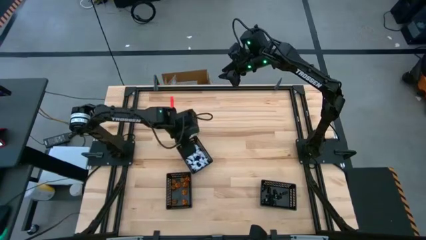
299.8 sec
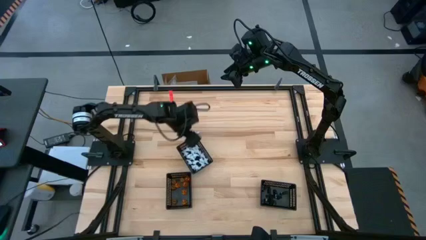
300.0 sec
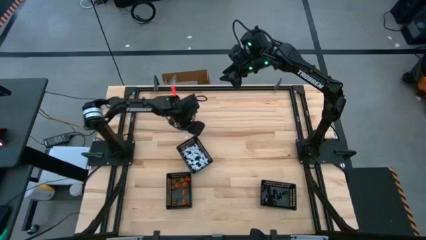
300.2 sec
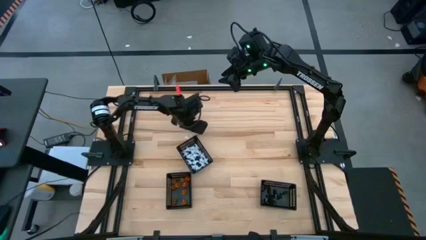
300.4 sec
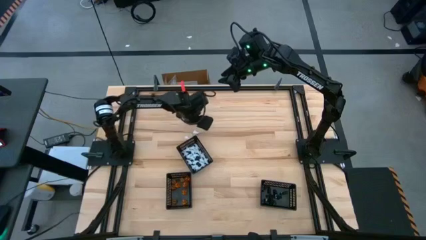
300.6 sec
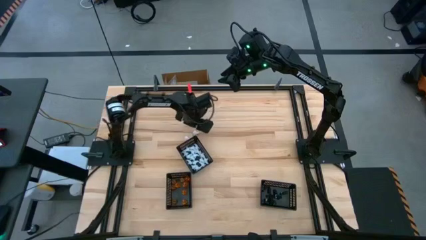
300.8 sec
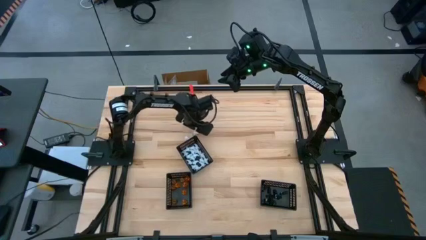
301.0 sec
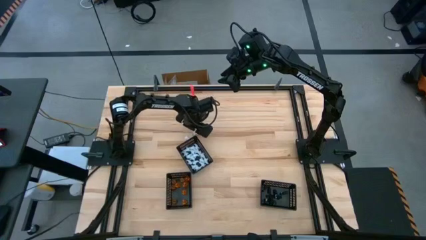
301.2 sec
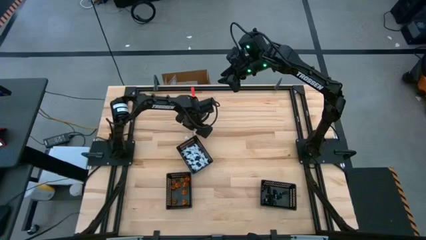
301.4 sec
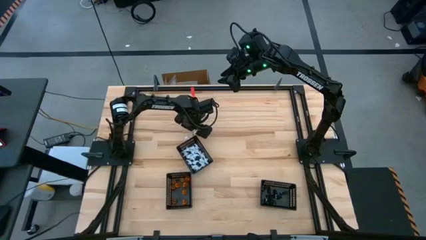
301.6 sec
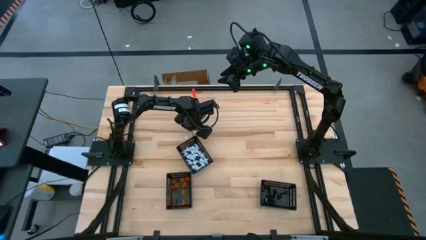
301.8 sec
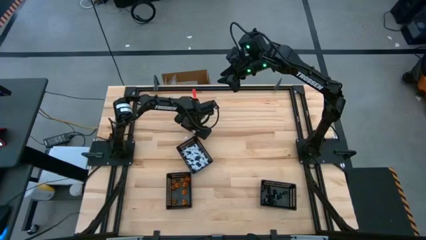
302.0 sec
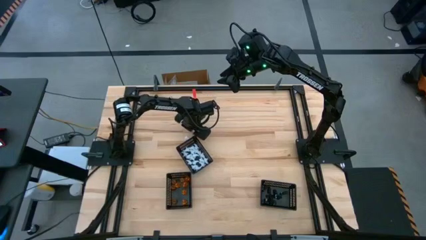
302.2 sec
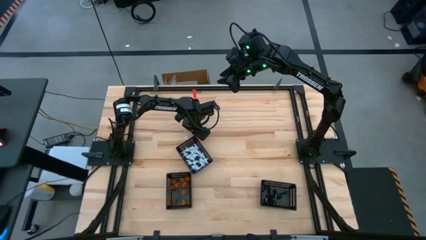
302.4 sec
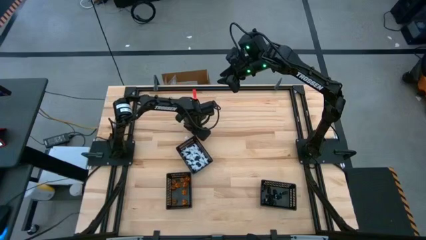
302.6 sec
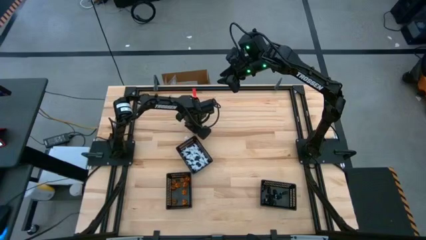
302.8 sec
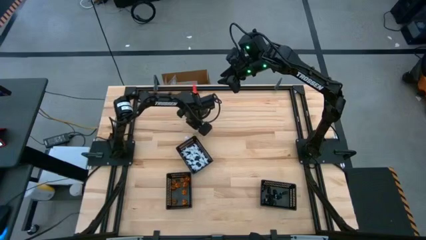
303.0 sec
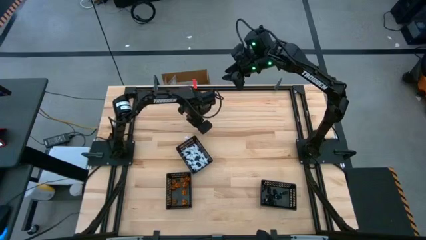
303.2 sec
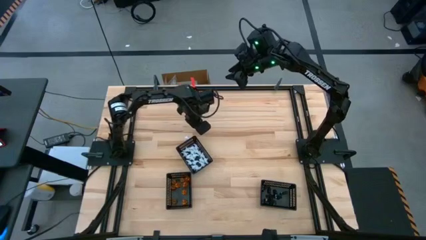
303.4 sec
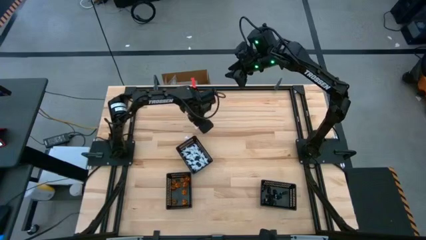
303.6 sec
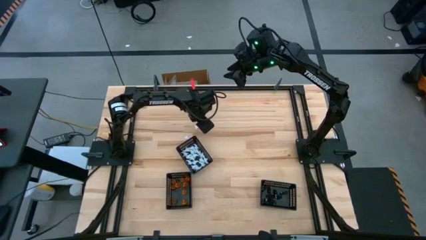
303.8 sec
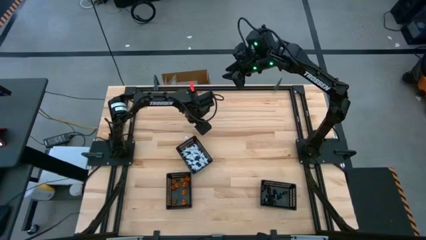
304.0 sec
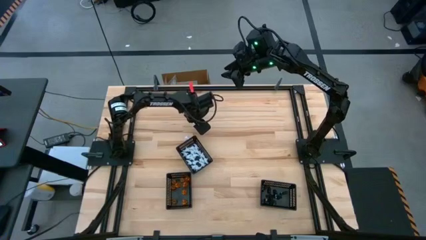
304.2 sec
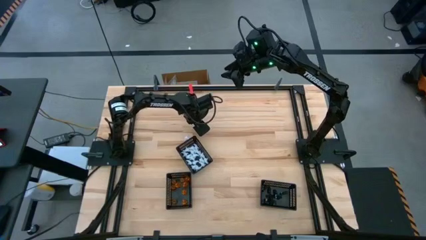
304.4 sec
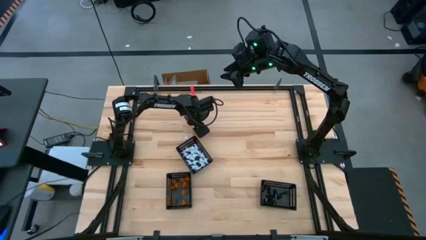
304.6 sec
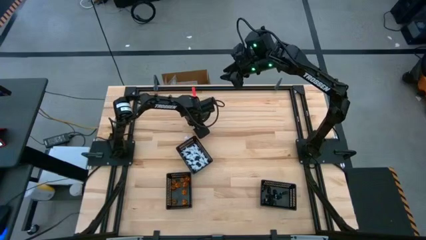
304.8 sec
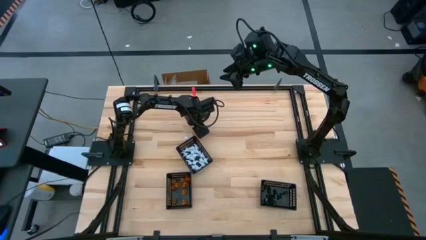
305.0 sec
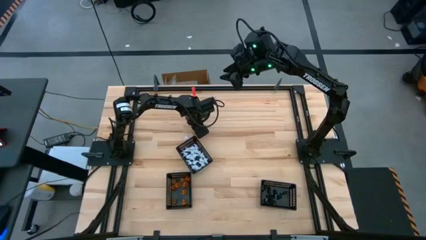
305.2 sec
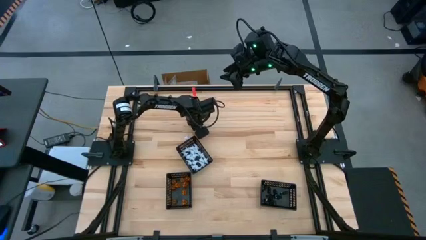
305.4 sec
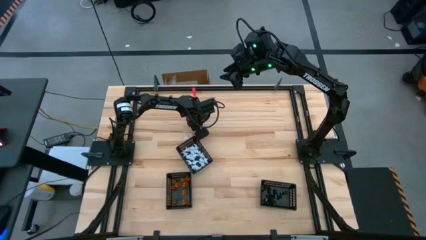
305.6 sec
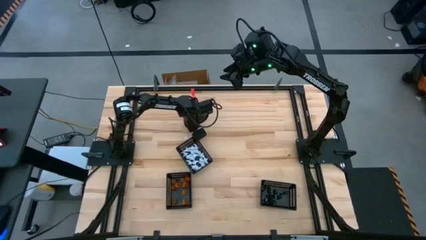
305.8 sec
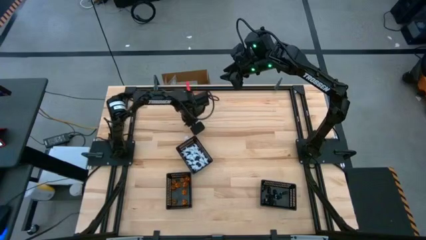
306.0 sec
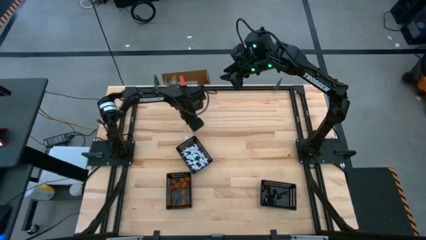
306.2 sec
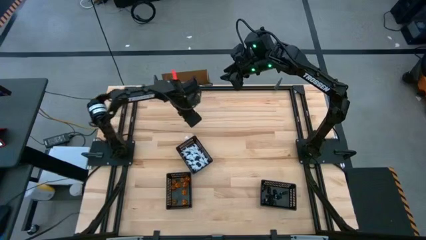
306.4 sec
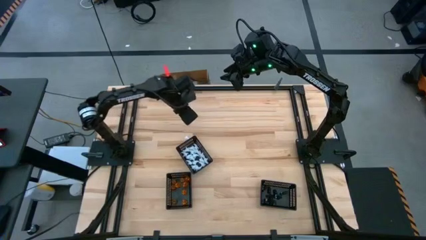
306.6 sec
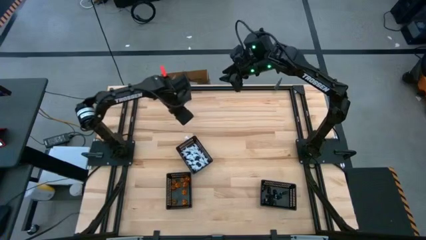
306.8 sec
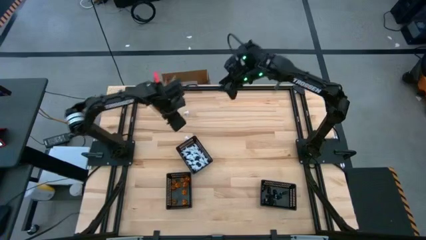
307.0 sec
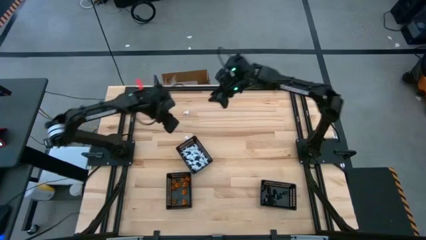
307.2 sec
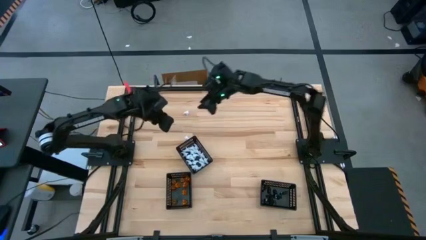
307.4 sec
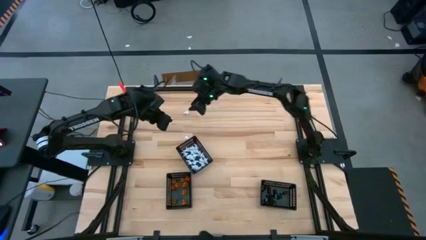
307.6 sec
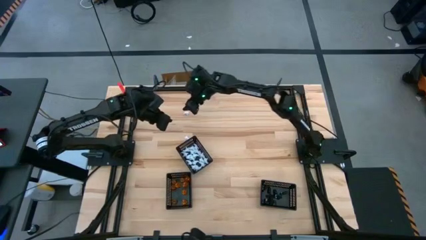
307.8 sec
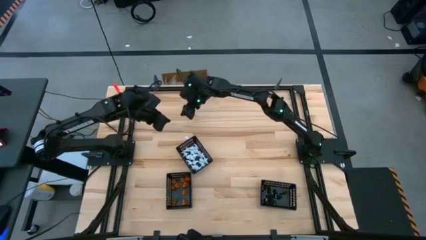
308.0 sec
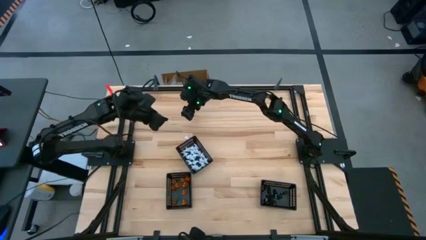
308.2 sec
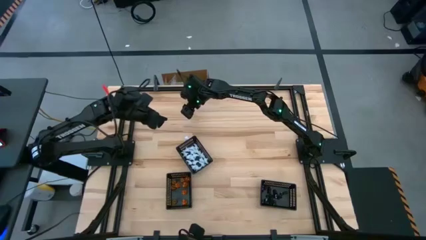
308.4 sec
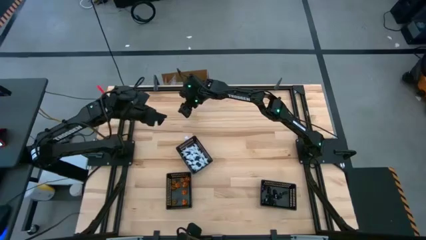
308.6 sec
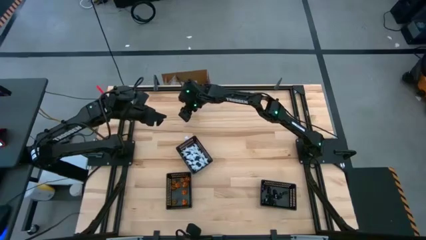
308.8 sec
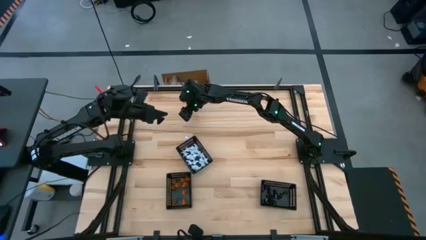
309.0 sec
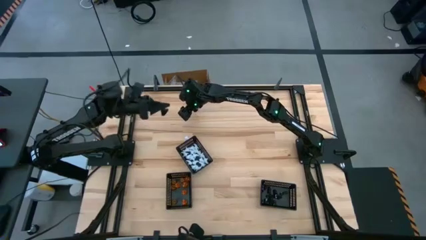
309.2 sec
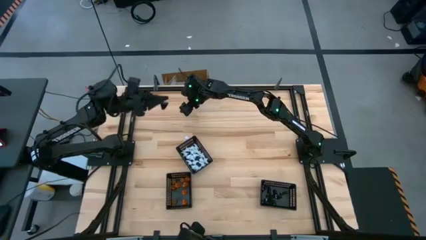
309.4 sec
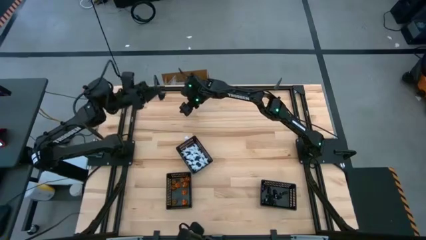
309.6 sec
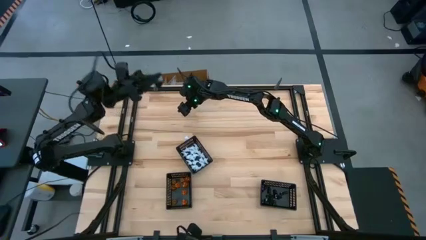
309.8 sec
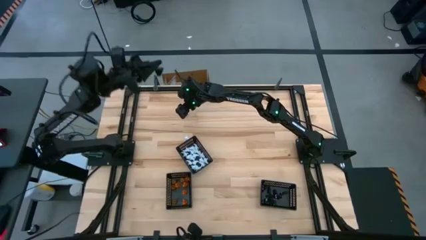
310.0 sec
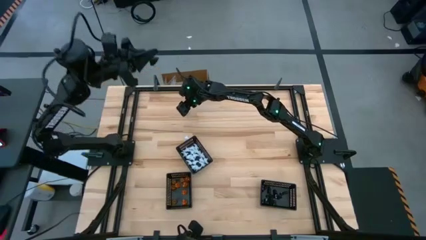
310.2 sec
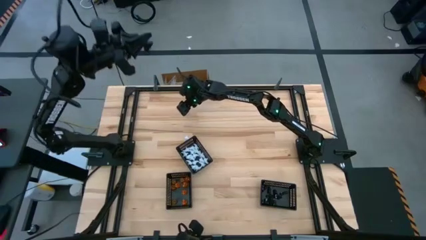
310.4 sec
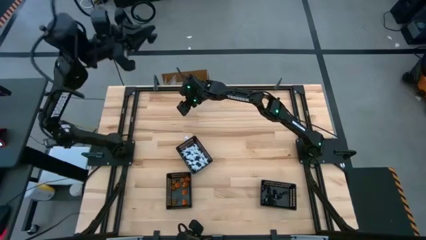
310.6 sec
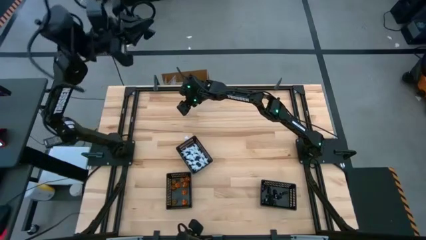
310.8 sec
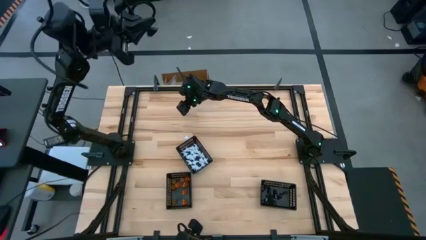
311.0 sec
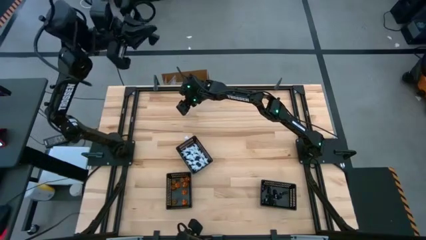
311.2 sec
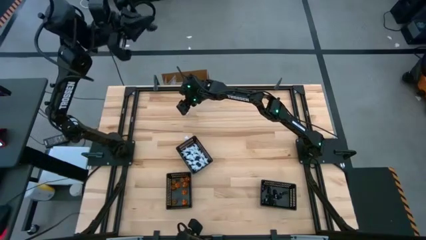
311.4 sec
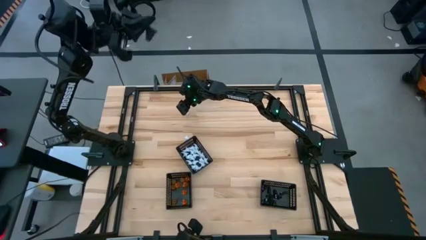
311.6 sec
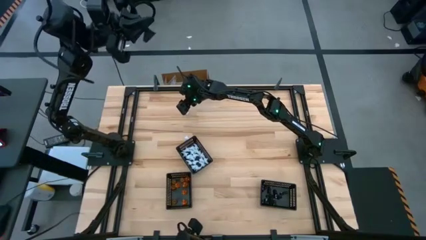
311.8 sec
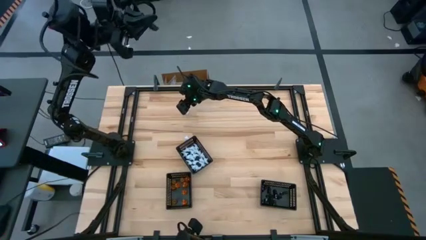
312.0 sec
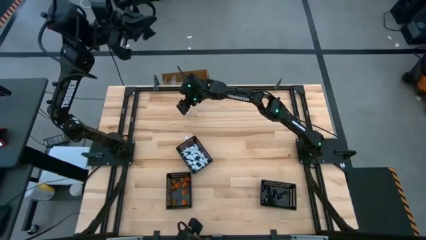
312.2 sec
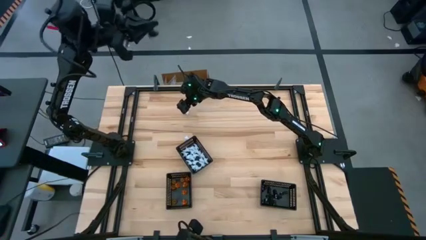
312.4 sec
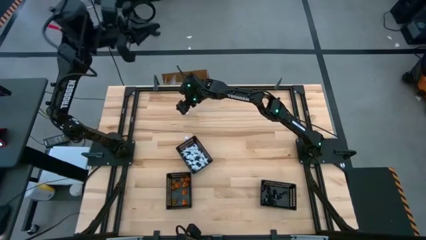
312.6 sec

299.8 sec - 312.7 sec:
Task: Sort Halloween decoration
Put the white ghost toy into the middle black basket

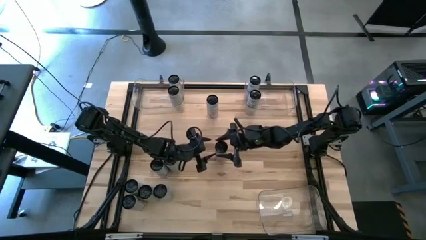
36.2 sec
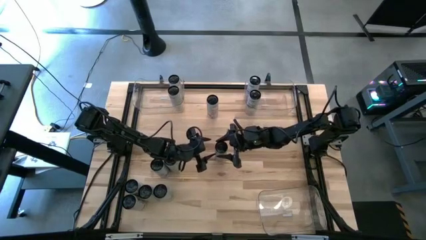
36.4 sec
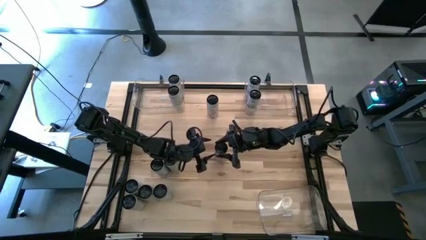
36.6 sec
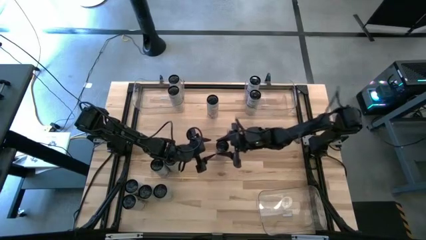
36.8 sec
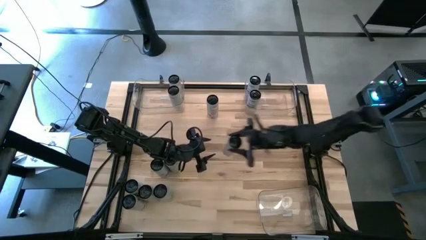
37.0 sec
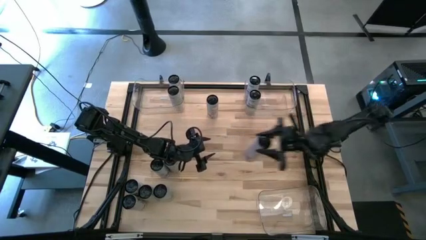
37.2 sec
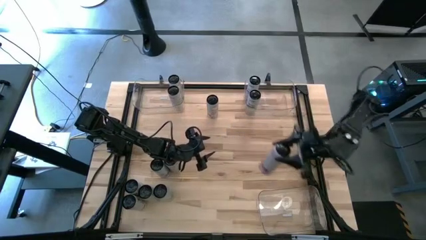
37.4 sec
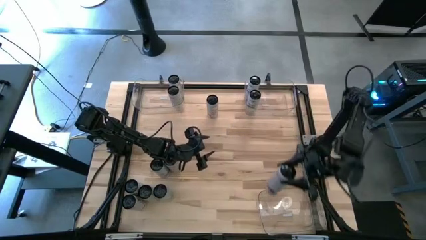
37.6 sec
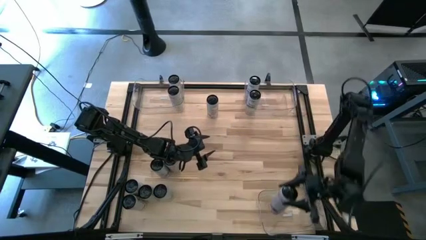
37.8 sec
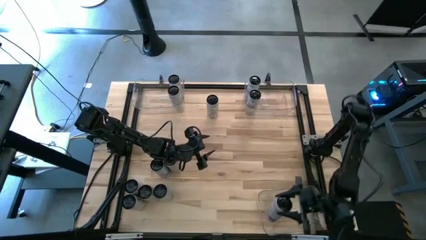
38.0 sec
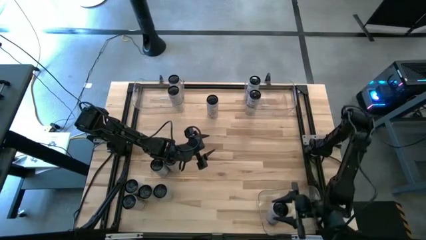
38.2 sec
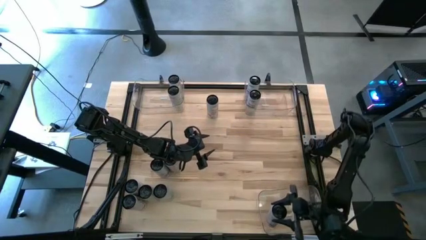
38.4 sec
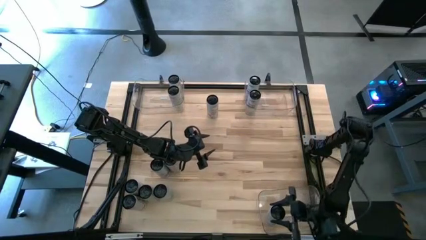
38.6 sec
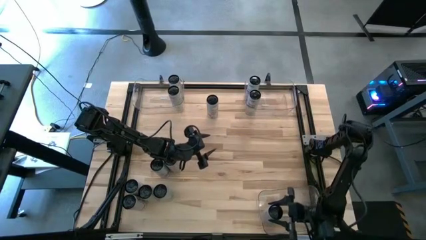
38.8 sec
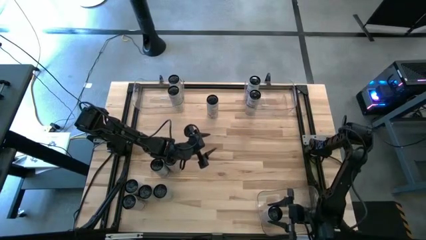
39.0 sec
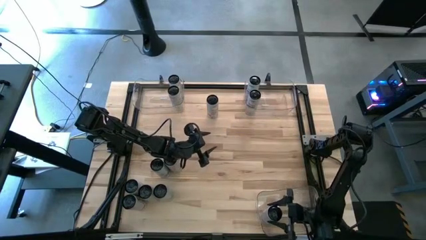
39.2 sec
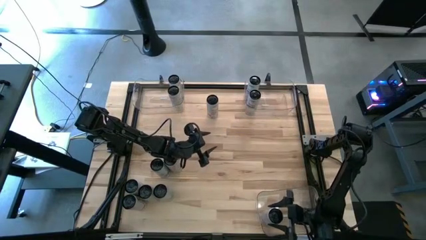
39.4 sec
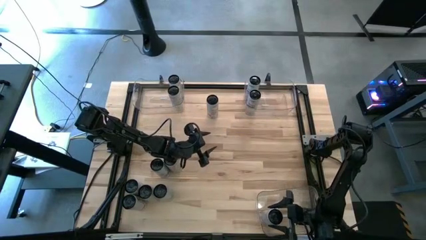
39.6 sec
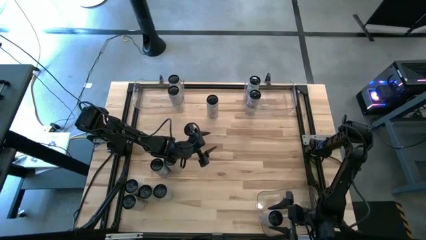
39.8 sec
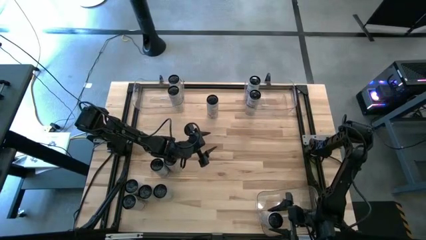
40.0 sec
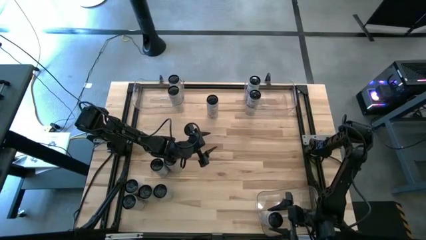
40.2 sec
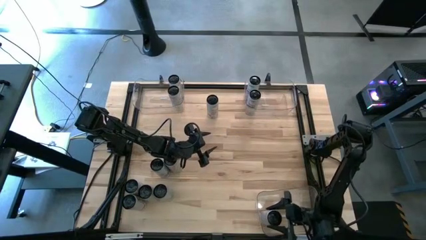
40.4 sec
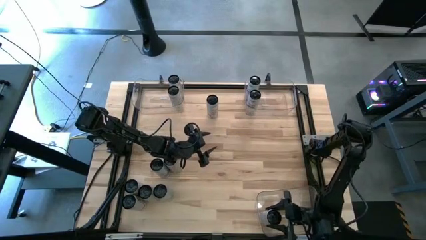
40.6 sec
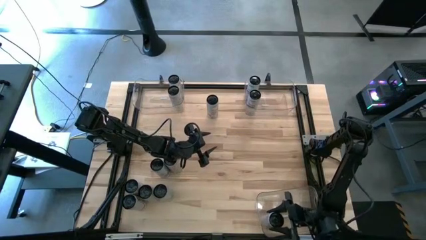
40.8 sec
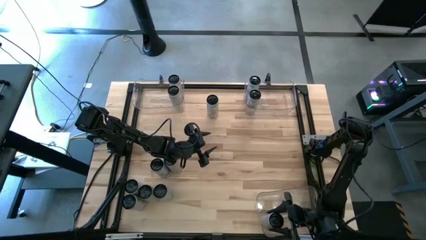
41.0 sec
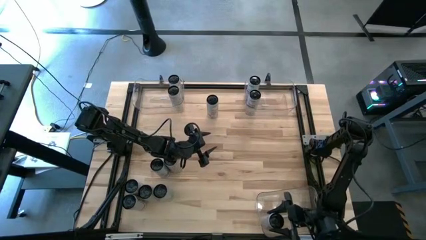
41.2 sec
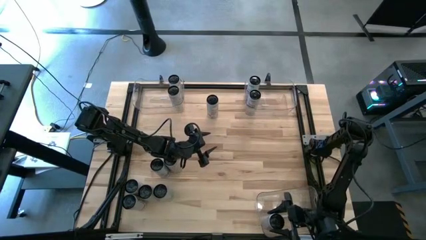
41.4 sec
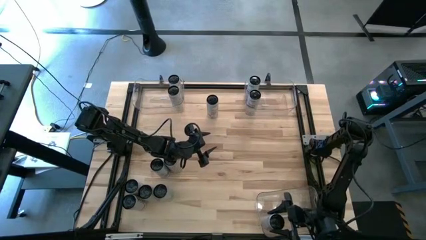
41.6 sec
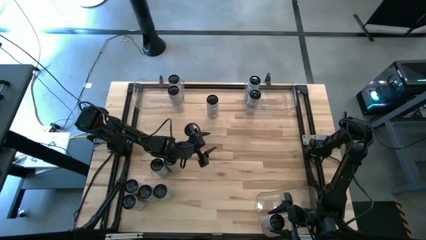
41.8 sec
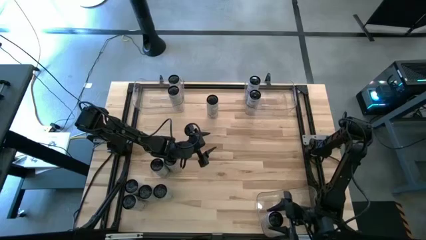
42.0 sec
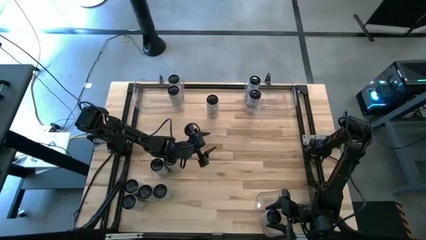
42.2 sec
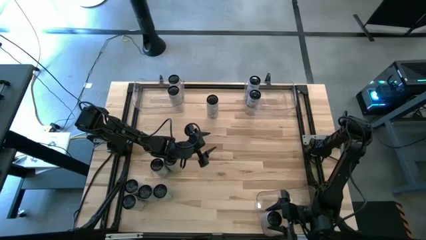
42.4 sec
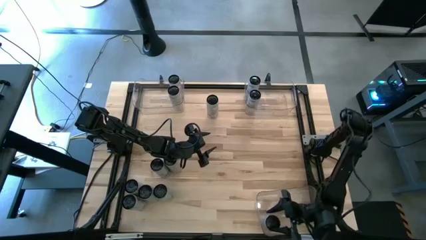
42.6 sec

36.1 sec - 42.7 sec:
Task: Sort soda cans
Put the white-pink soda can into the bottom right transparent bin
